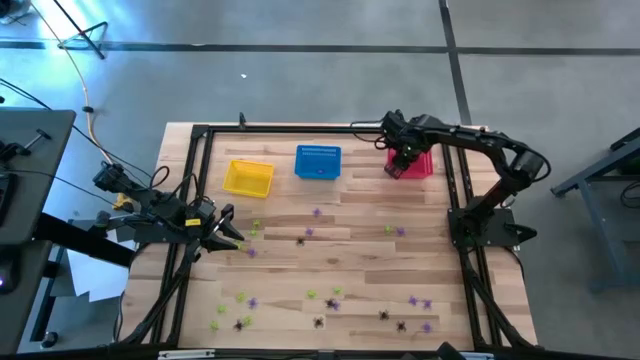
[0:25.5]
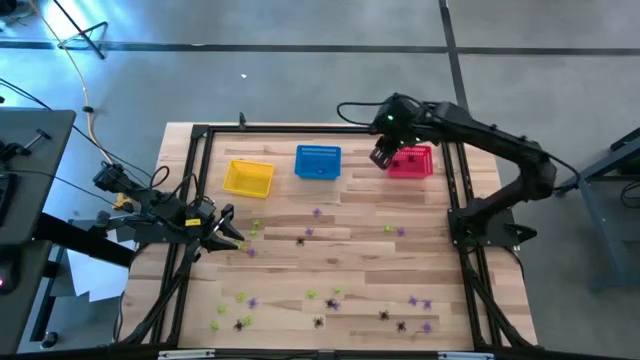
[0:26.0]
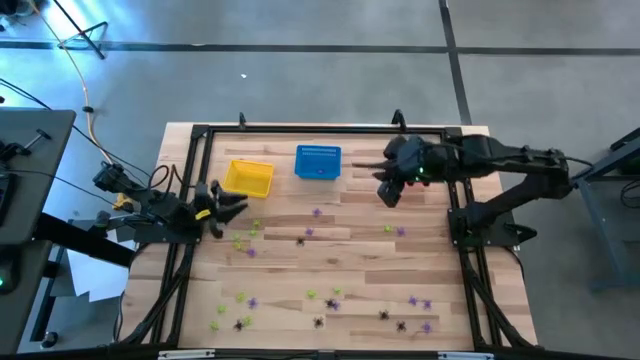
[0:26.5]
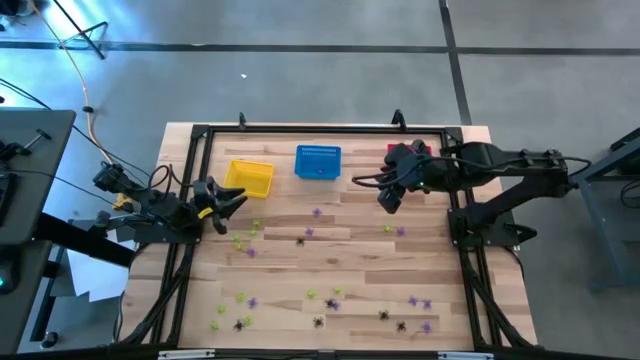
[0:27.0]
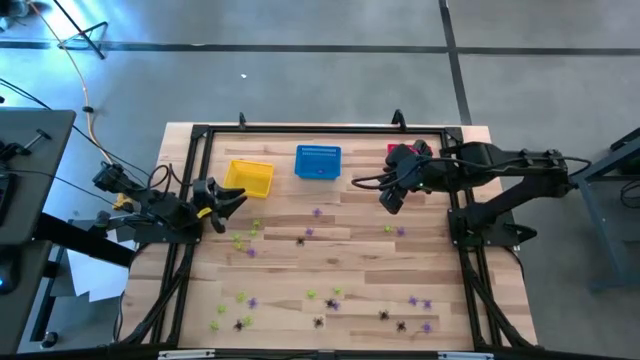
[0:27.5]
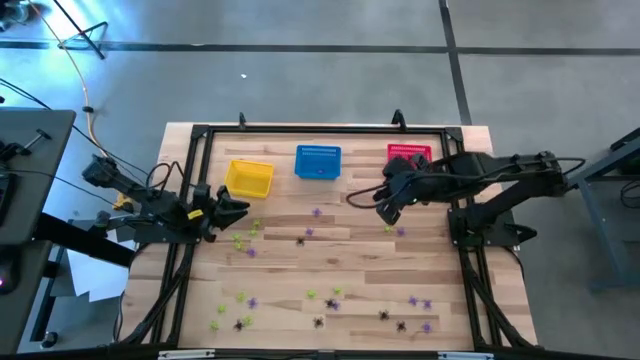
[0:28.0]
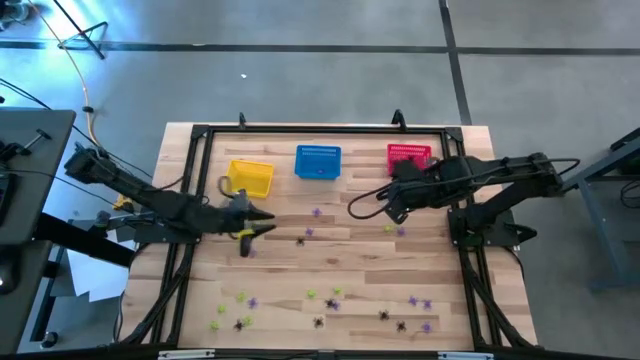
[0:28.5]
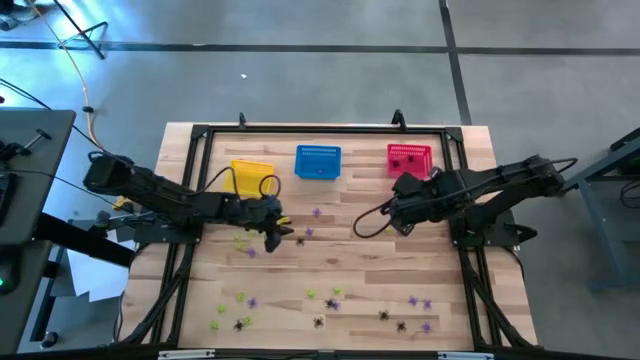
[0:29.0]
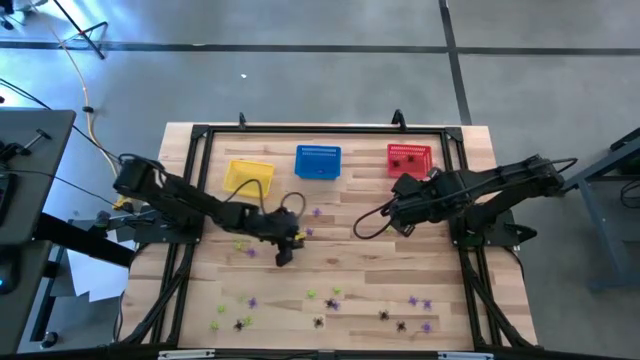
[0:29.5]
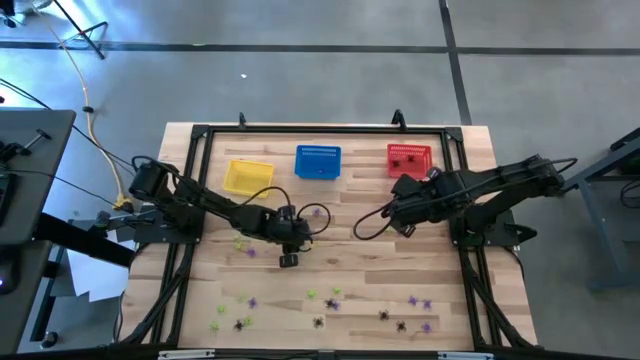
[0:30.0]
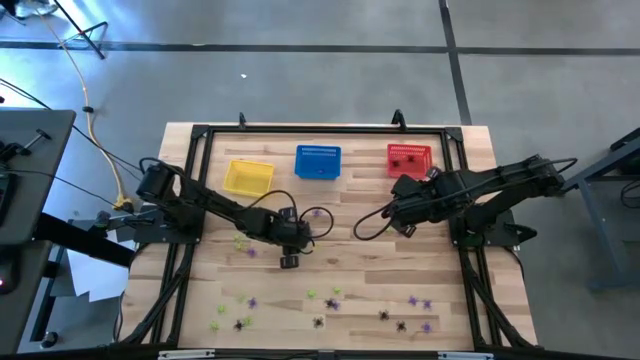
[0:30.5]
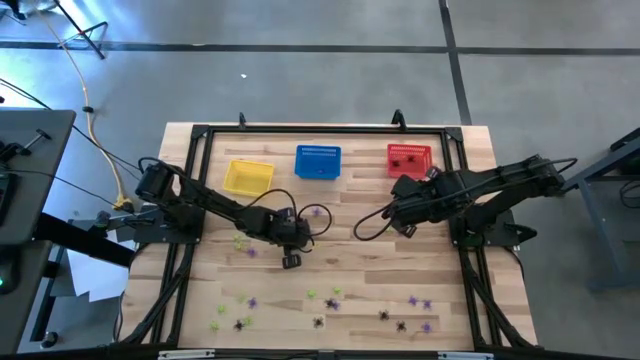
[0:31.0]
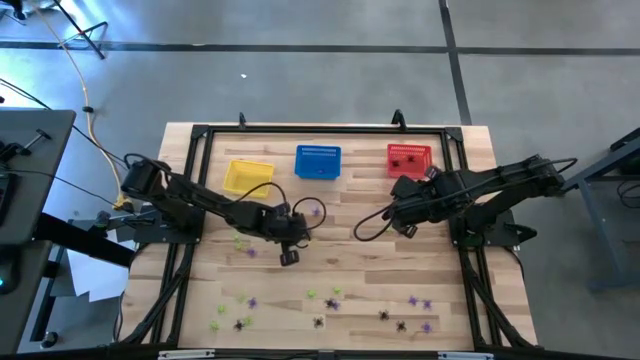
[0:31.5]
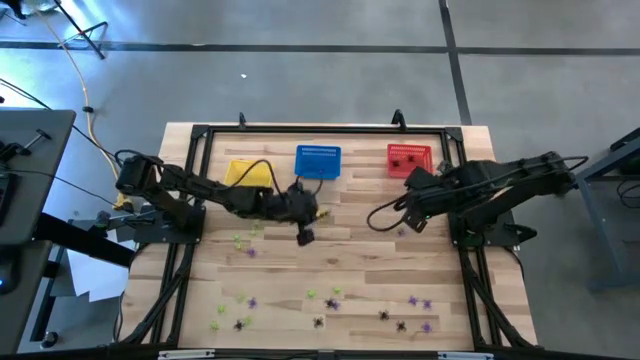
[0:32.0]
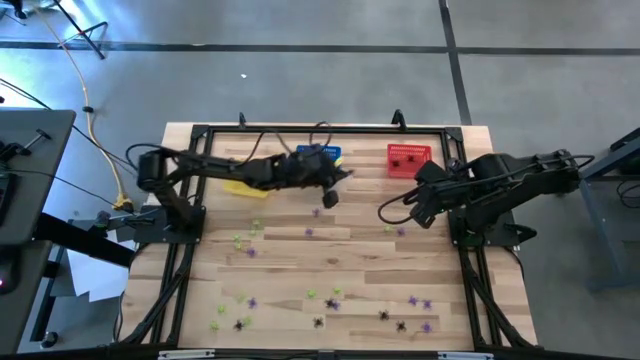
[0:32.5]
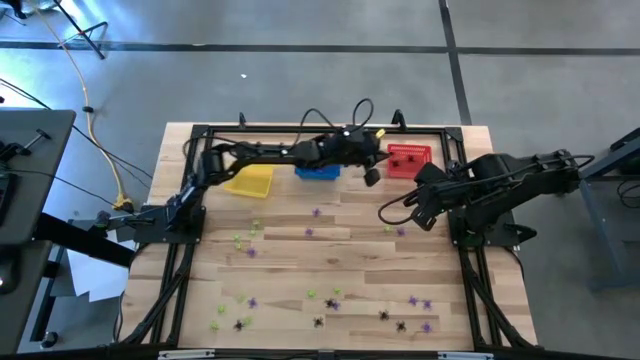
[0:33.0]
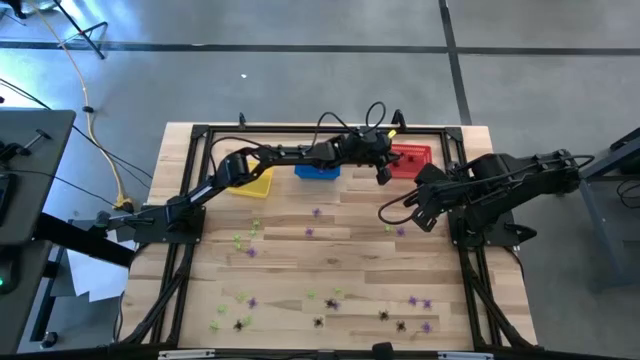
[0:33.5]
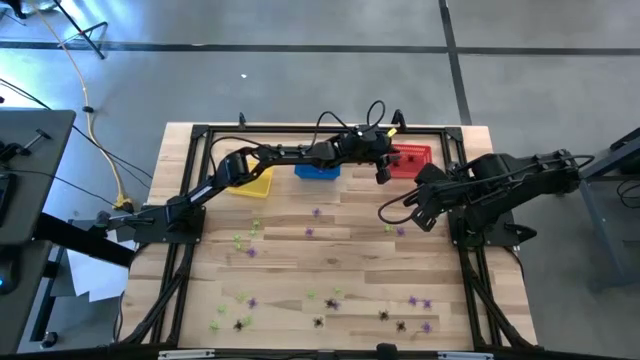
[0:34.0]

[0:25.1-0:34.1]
Task: Sort Halloween decoration
Put the black spider toy into the red bin

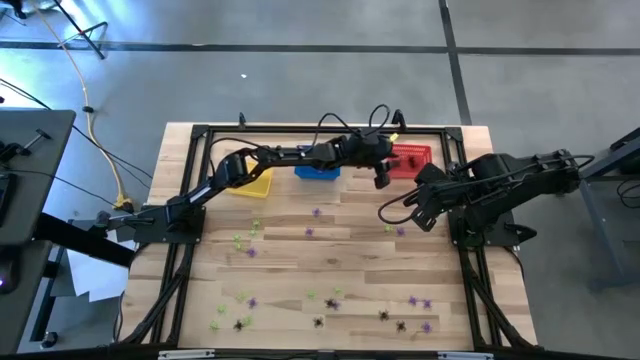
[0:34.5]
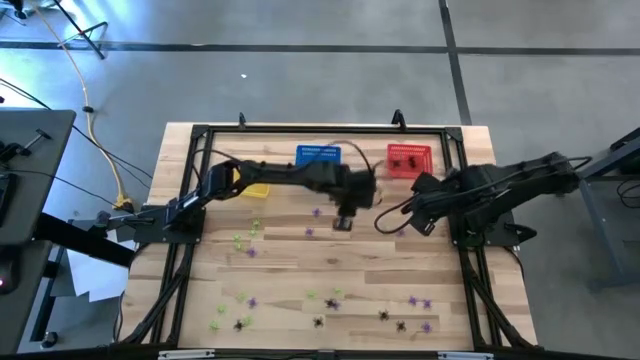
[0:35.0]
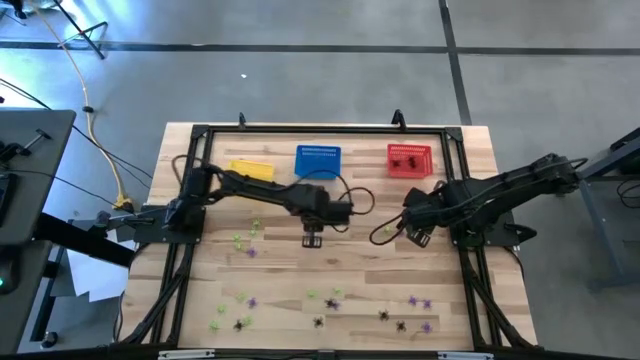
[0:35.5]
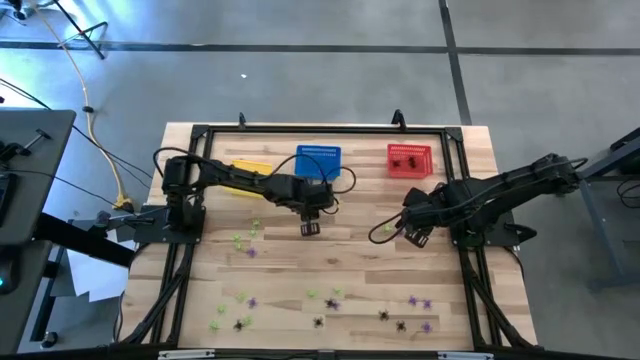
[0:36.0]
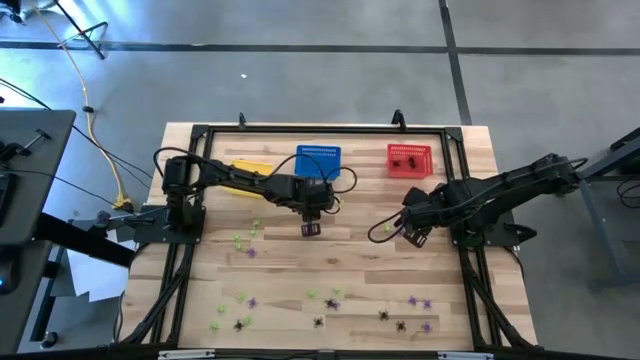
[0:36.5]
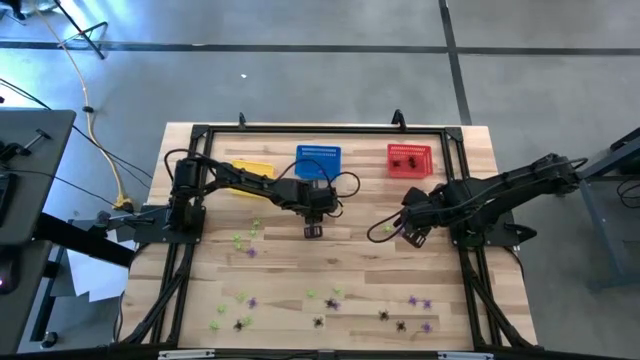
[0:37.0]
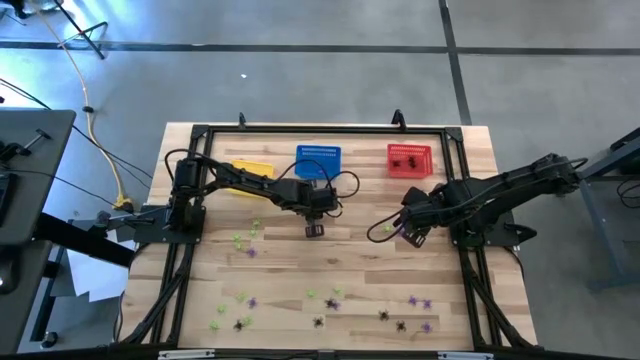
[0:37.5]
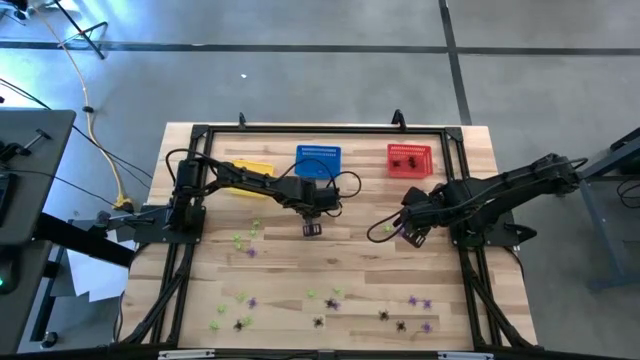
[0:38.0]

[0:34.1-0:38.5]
Put the purple spider toy into the blue bin

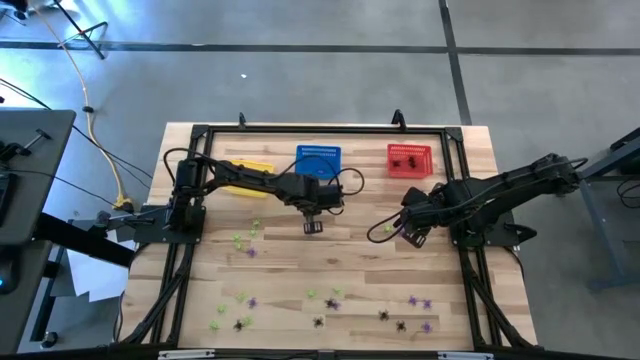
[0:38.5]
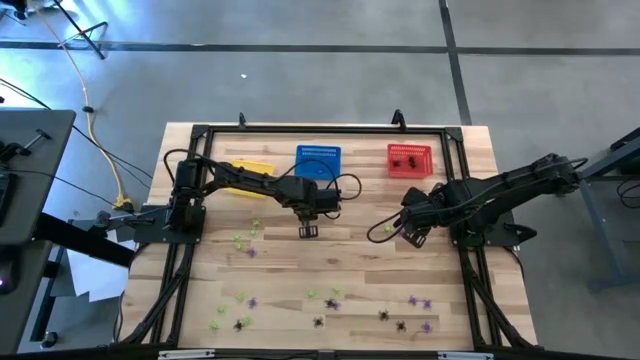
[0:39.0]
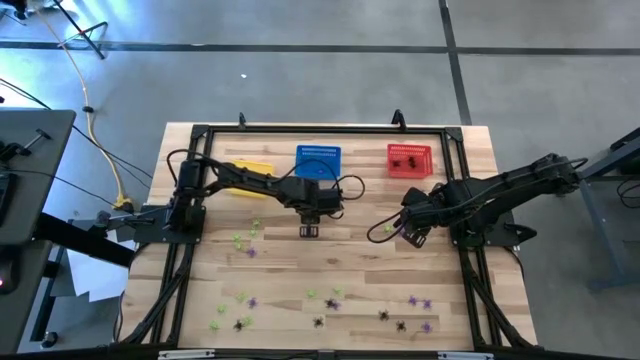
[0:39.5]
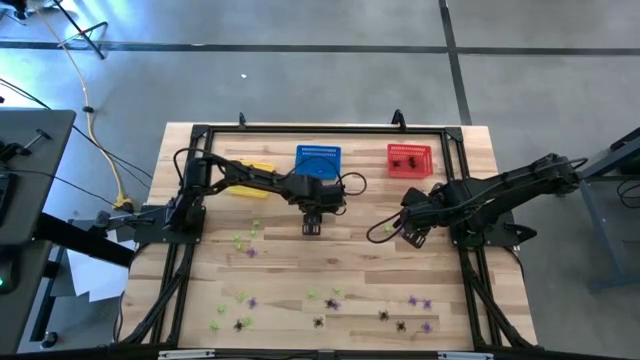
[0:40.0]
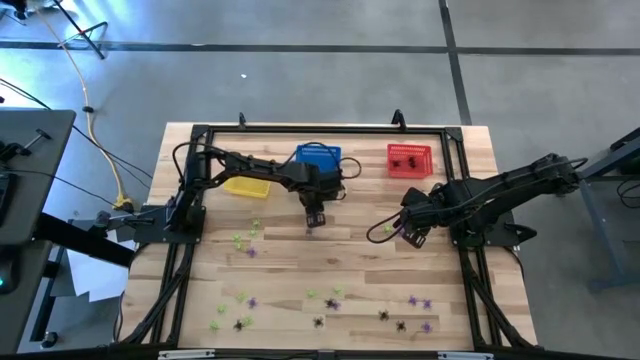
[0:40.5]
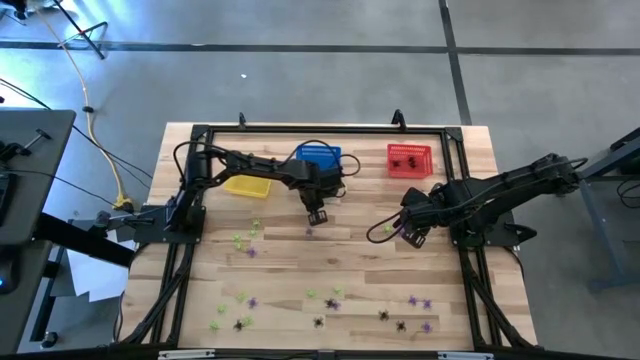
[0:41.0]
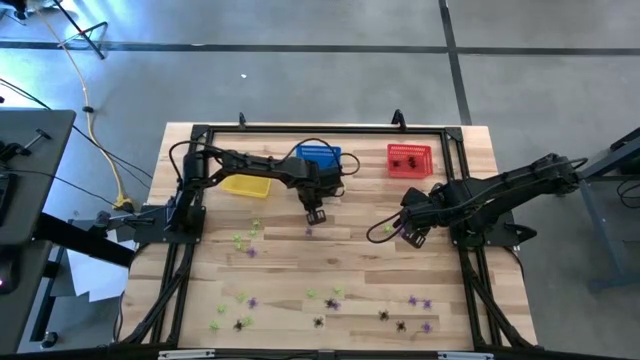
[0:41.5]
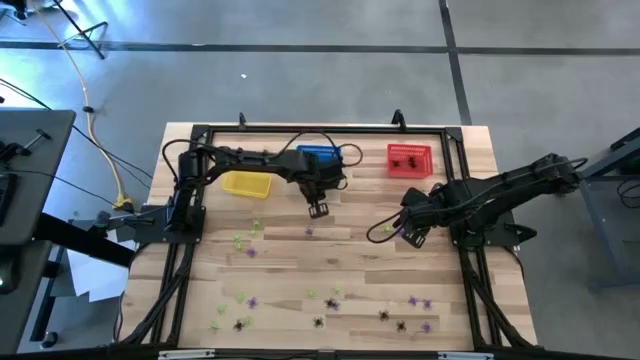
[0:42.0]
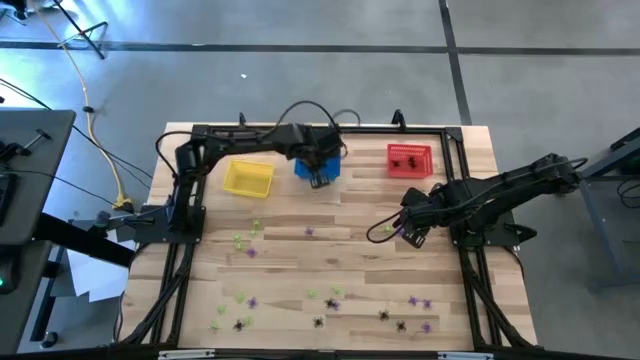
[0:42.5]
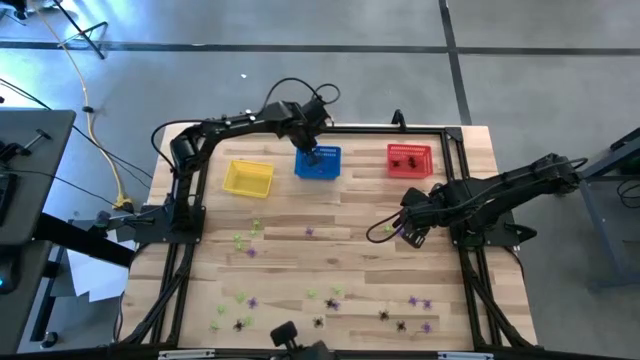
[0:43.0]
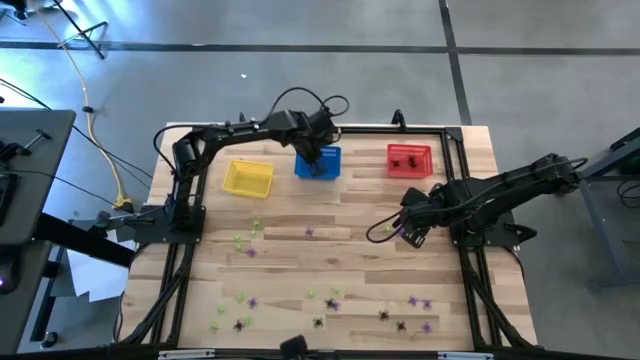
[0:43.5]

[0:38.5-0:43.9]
Put the purple spider toy into the blue bin

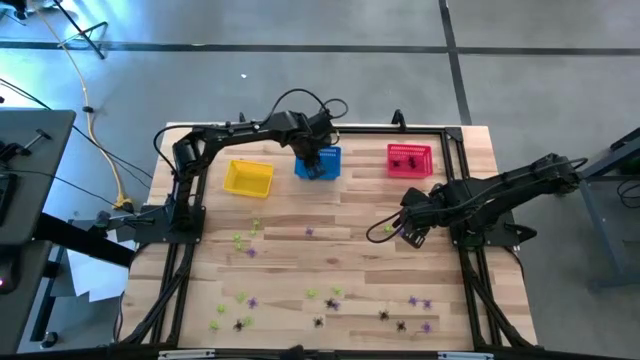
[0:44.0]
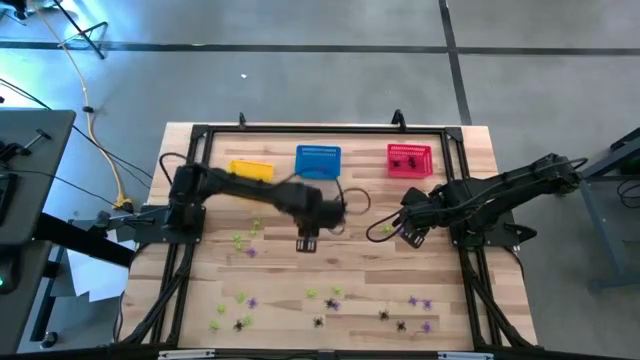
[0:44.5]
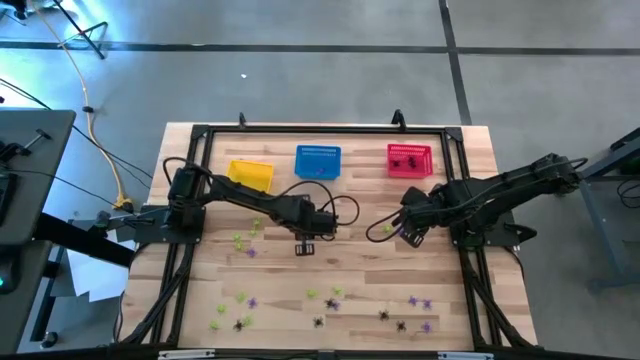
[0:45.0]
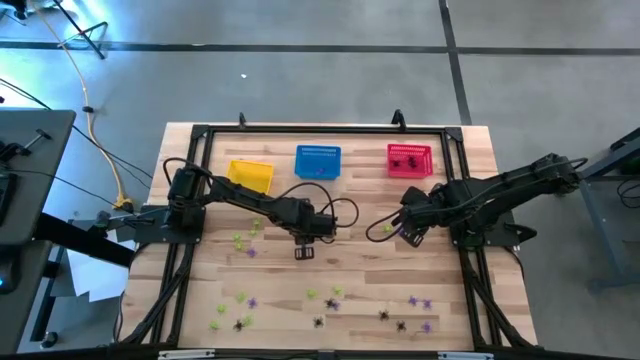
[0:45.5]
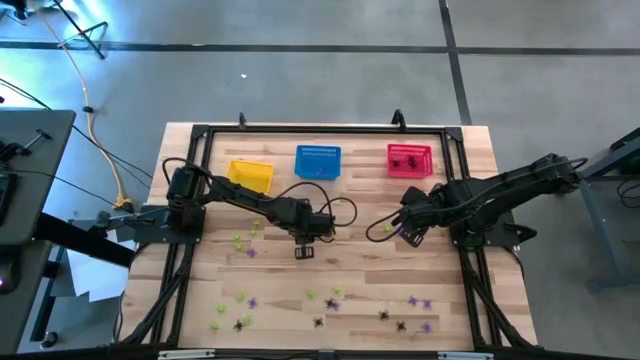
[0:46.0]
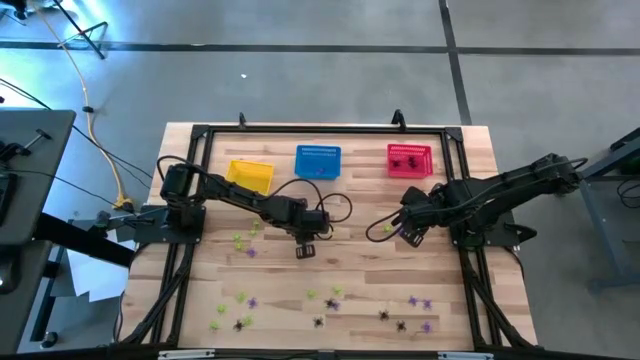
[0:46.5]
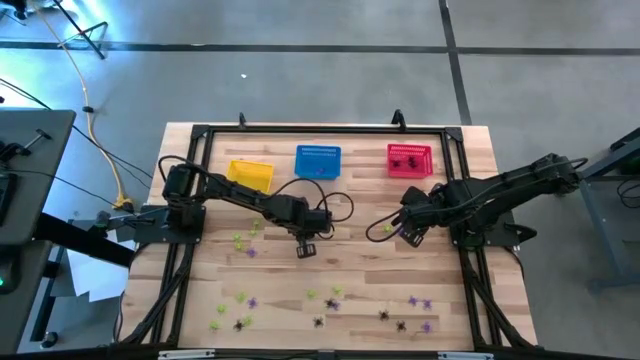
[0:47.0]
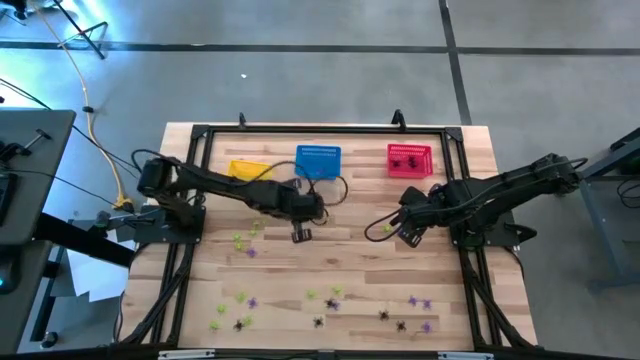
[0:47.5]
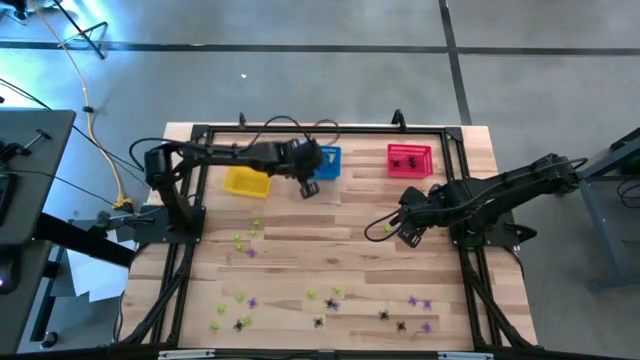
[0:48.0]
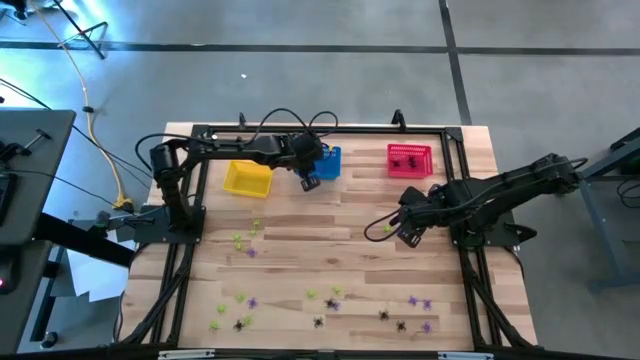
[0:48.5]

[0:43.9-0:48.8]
Put the purple spider toy into the blue bin
